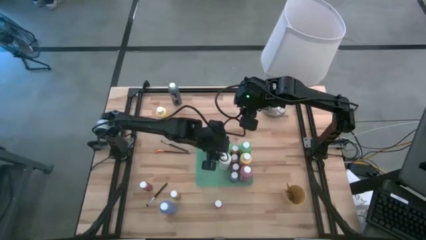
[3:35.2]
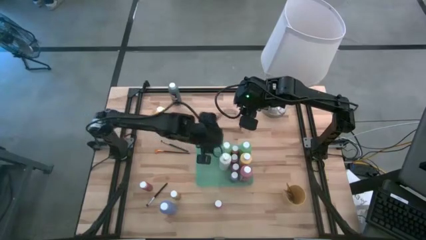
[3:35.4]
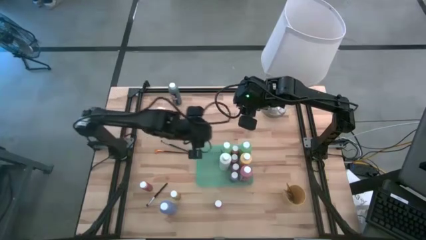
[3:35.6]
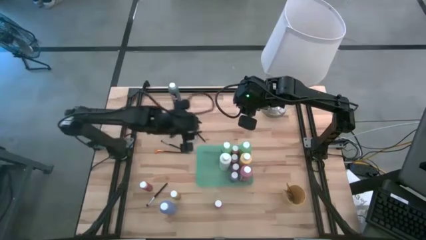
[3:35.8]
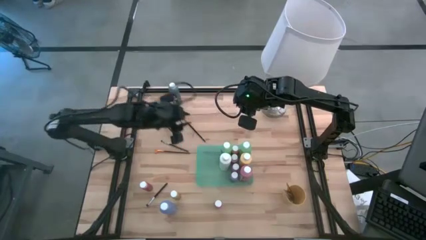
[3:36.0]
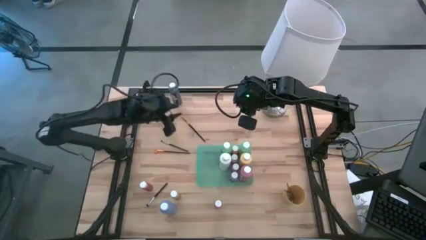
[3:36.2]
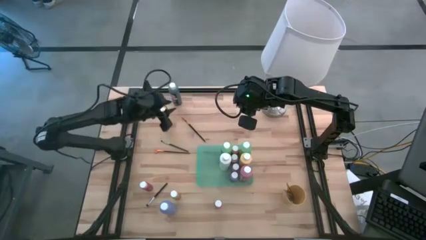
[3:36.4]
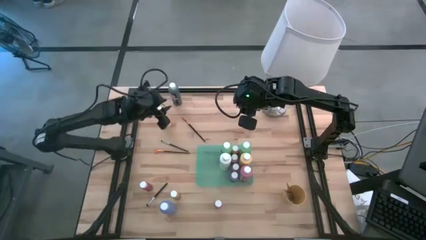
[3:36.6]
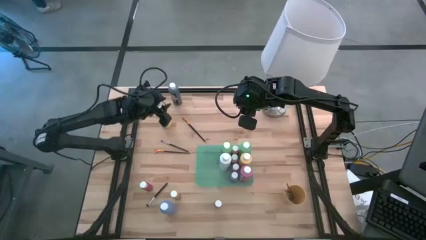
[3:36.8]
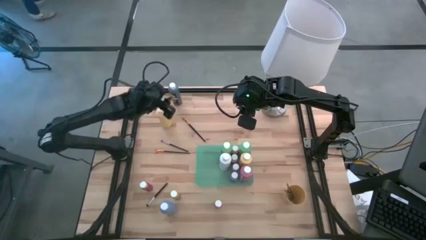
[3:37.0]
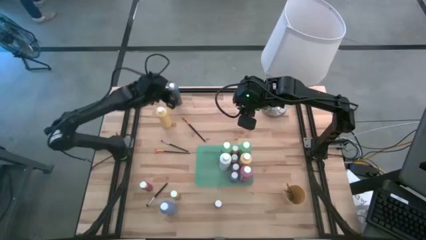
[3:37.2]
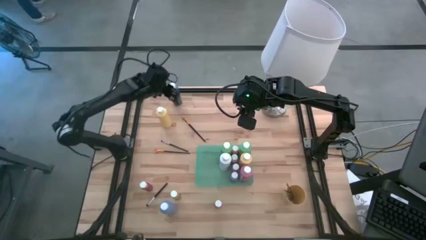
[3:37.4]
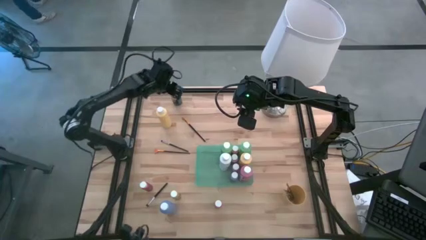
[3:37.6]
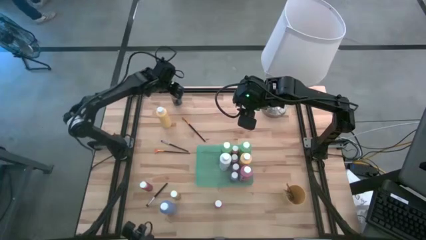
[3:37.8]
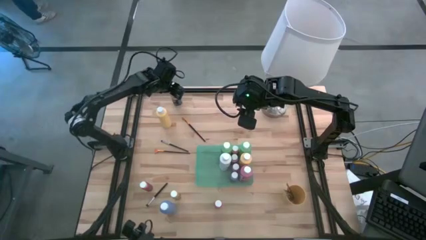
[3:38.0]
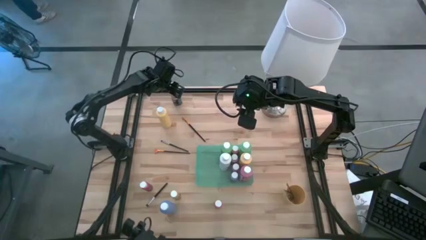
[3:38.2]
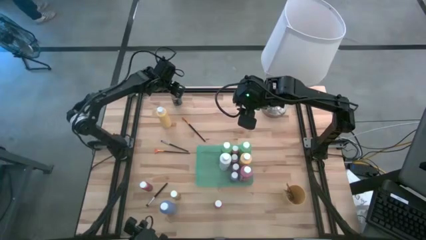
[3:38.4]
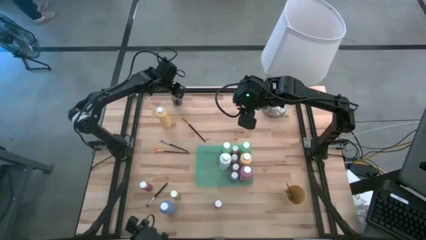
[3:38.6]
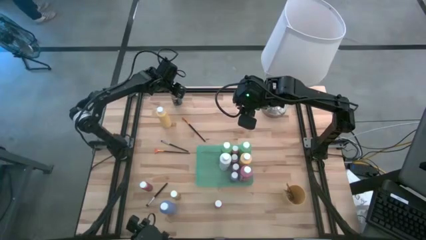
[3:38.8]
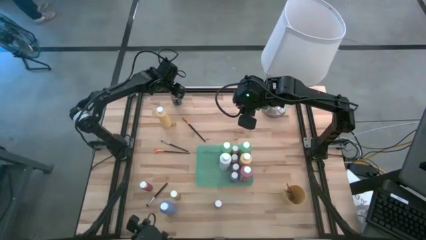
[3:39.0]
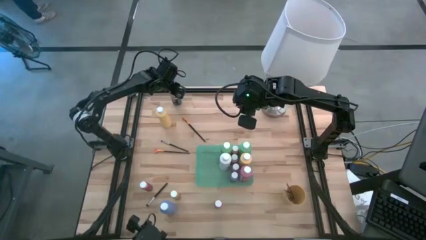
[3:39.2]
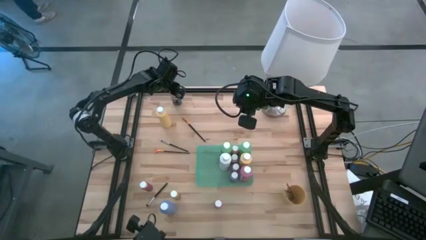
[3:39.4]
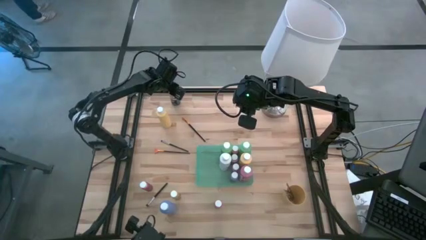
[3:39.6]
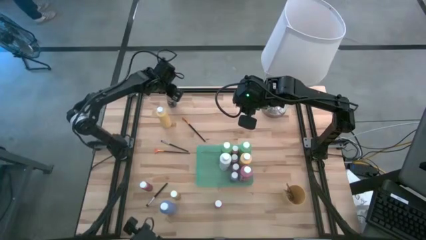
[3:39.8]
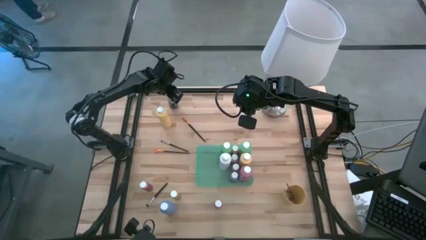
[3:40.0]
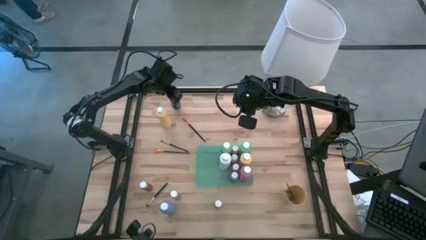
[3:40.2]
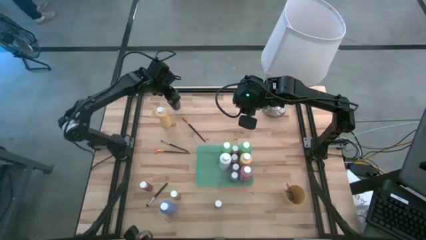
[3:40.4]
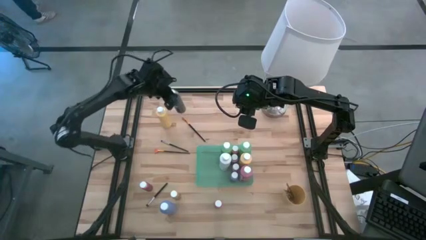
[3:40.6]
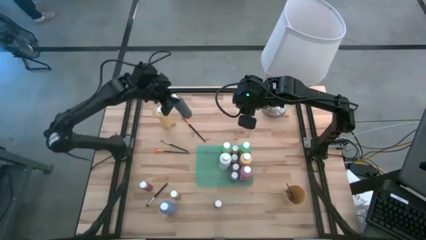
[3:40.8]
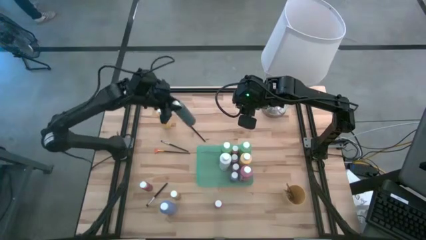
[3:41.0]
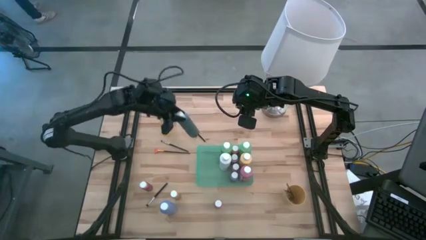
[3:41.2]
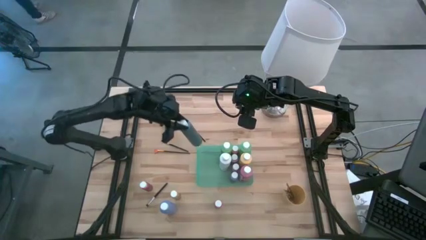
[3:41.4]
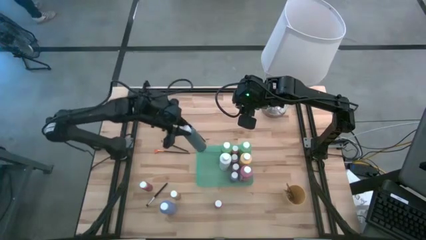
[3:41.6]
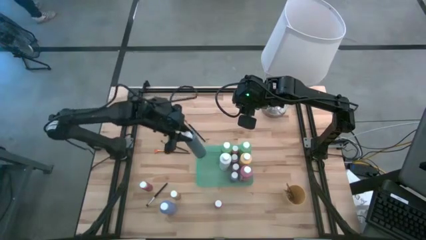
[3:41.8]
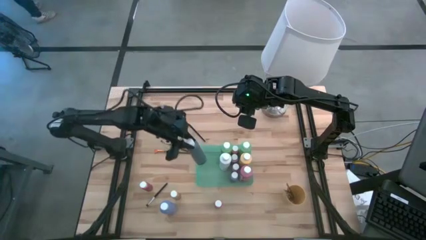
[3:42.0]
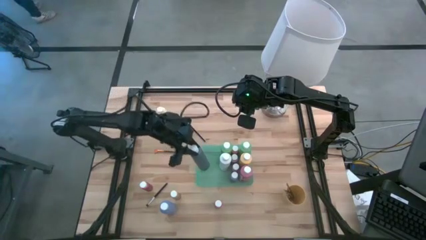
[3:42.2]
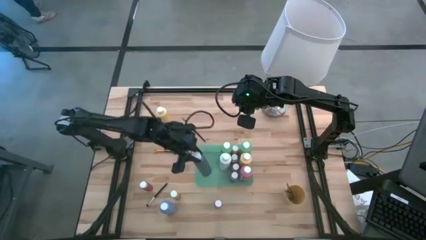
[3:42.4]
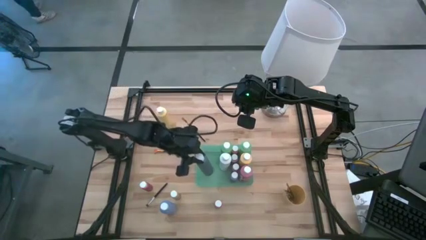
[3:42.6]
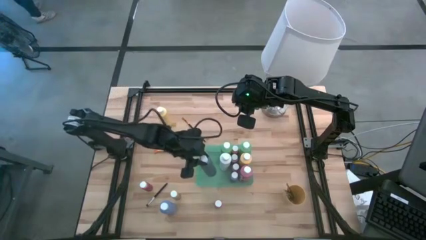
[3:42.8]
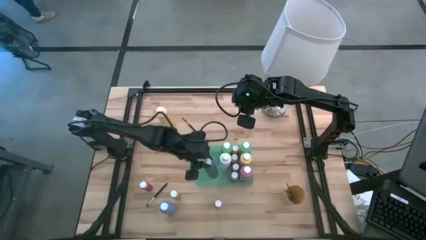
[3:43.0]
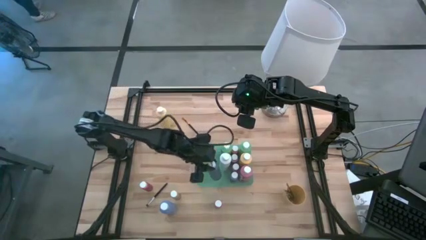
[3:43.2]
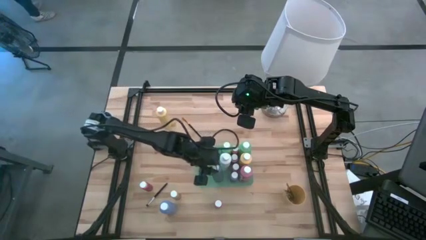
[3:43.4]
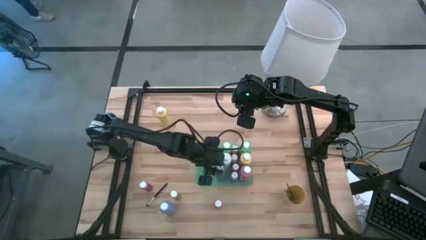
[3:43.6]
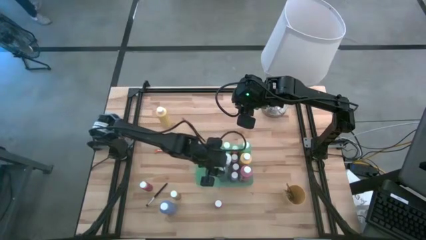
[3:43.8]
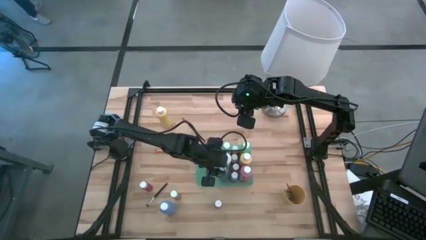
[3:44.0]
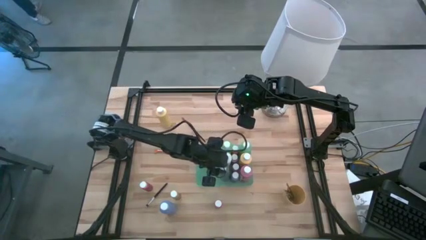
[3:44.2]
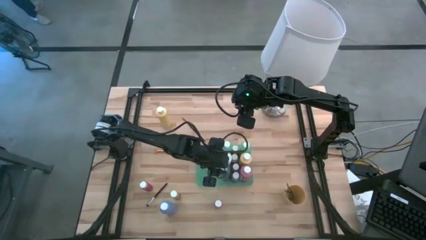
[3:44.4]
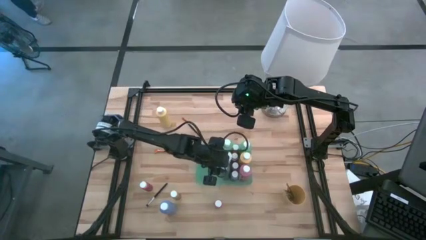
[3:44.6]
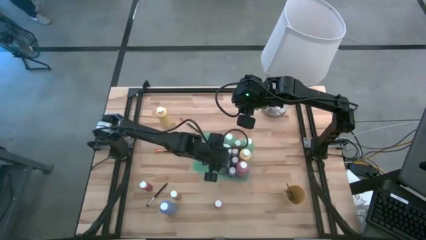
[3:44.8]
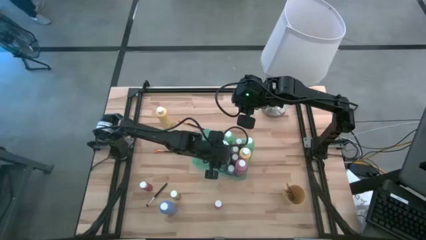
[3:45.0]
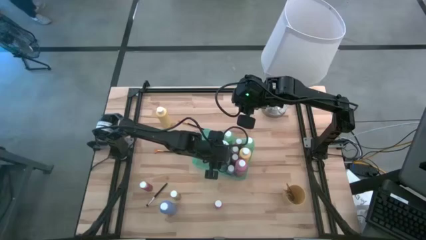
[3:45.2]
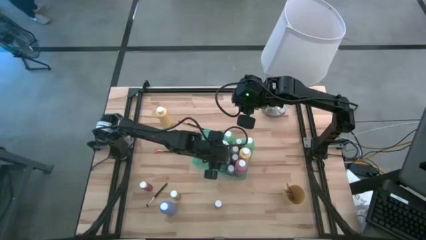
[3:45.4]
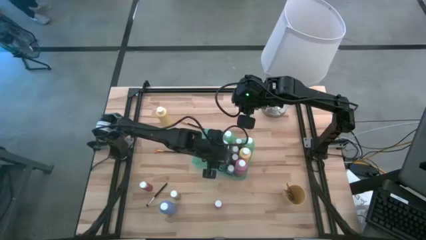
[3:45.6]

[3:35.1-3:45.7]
Task: Pick & Place Paint Supplies
Put the black paint bottle into the green bin

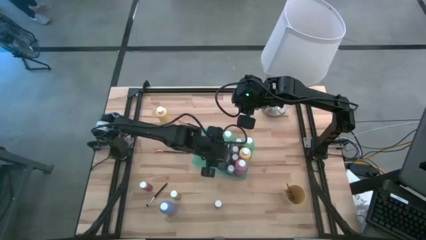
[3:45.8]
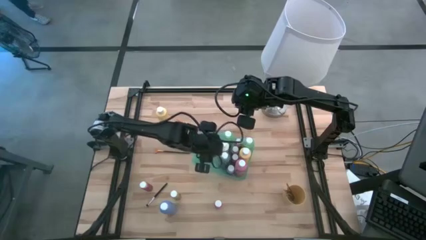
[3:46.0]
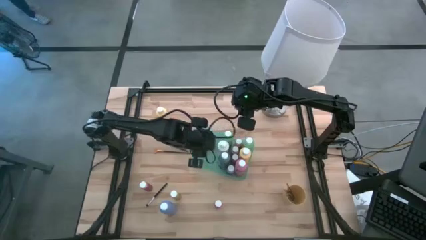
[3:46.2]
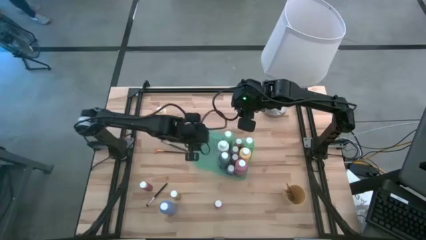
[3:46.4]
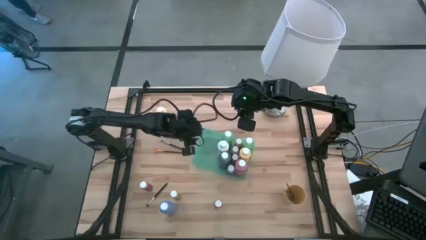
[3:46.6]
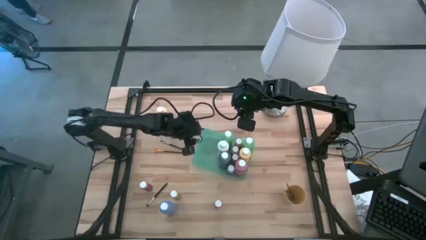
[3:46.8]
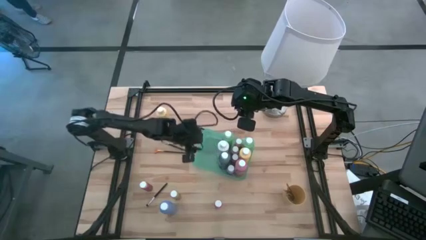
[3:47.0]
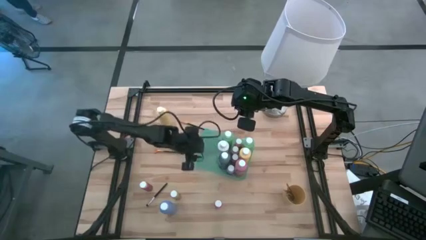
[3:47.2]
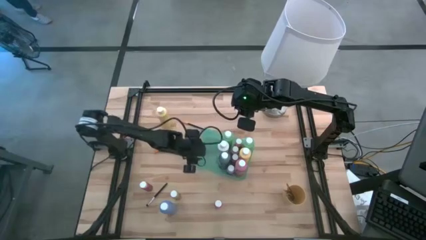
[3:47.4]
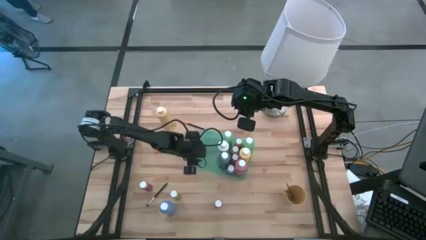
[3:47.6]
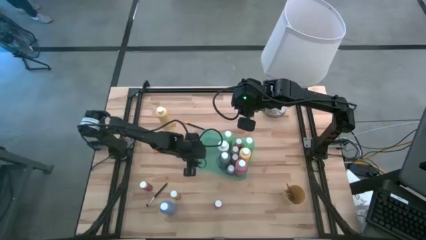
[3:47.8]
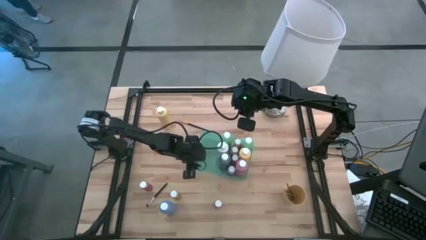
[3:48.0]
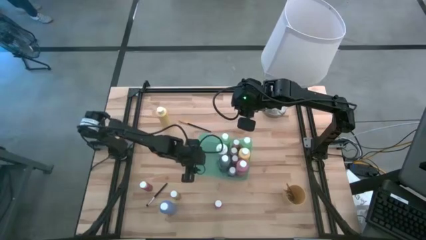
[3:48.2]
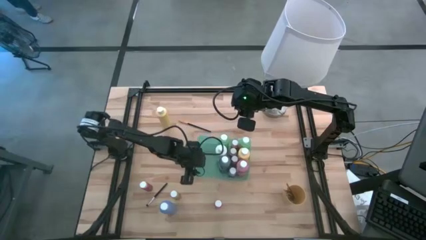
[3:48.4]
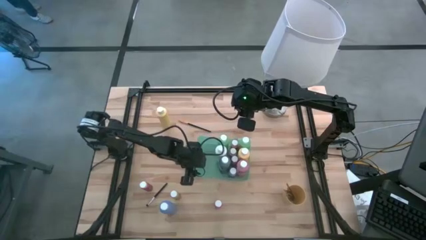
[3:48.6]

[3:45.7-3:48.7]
Adjust the green bin

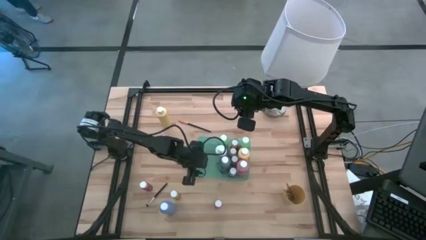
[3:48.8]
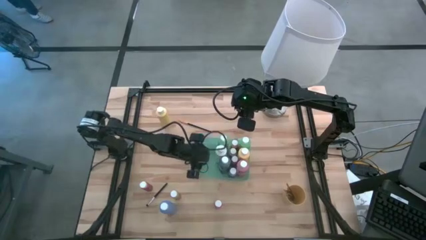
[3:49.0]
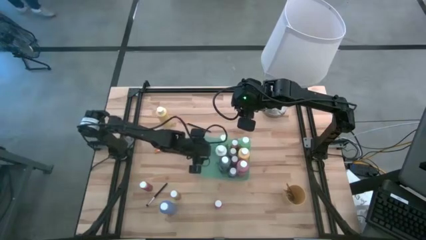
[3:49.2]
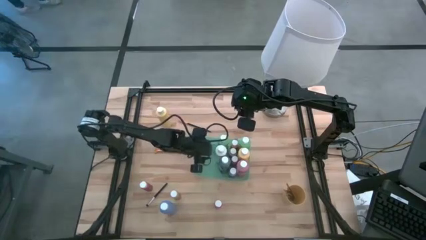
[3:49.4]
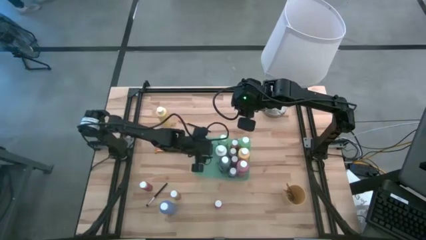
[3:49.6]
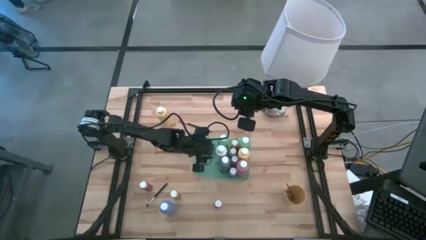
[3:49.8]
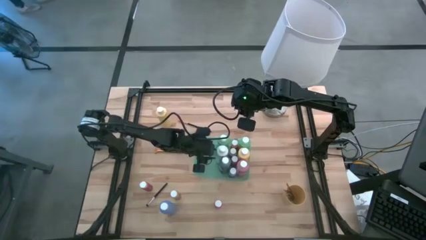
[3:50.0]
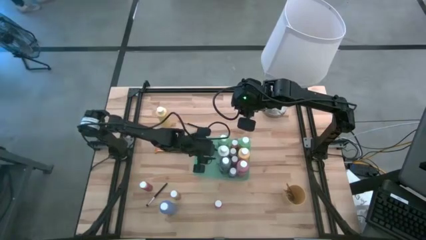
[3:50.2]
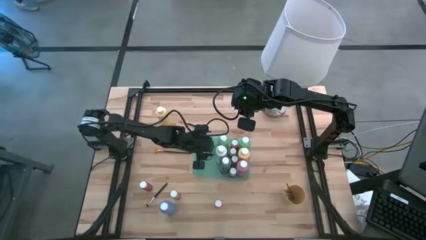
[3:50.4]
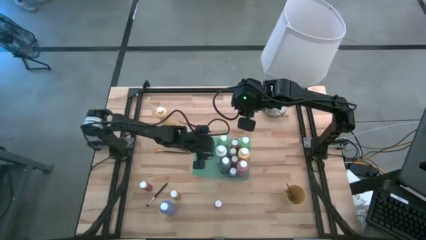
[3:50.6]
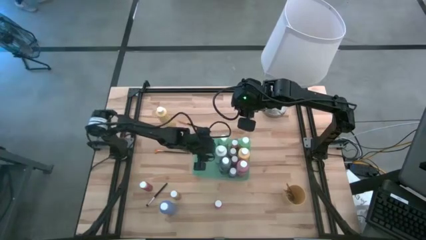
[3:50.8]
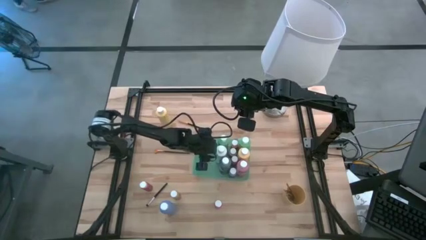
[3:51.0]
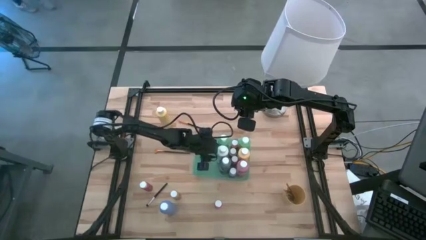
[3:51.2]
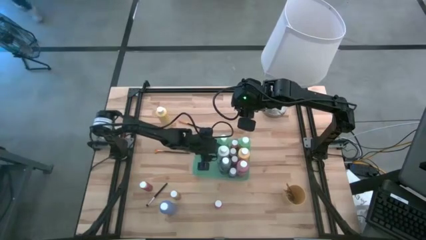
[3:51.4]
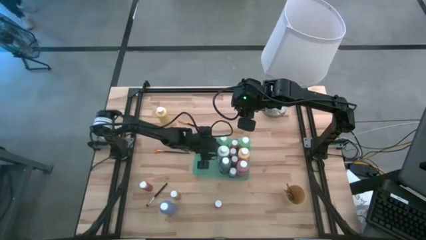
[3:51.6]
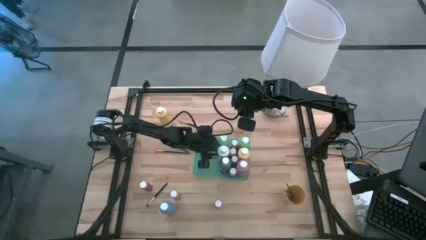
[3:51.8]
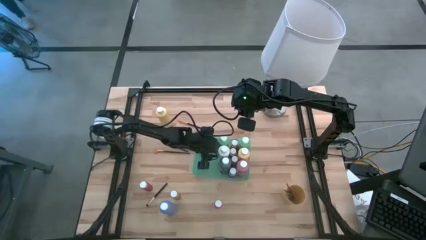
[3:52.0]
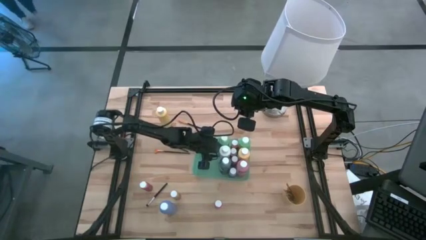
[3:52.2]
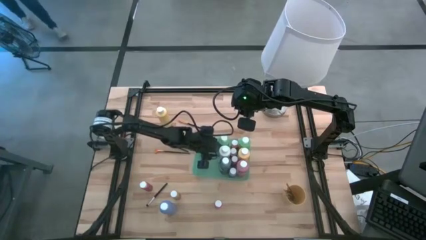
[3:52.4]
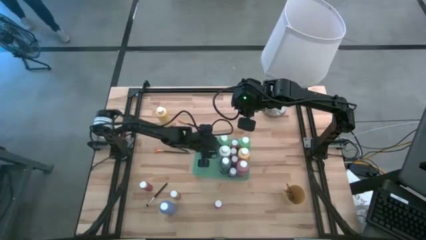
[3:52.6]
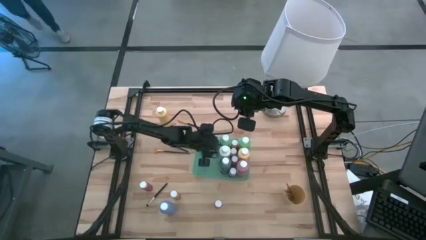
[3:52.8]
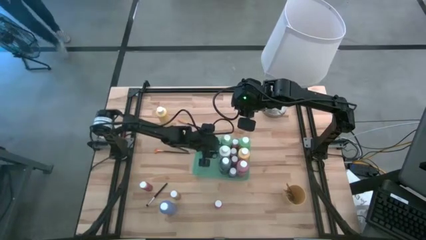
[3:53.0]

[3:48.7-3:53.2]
Adjust the paint bottles in the green bin
